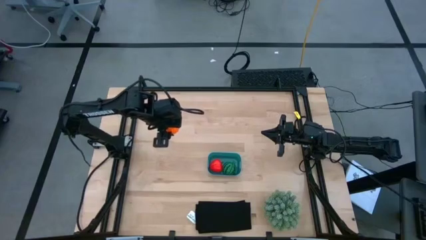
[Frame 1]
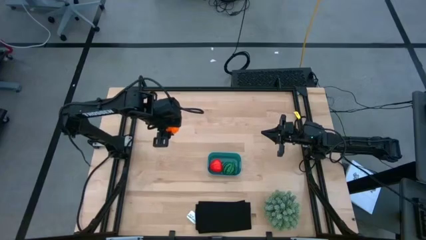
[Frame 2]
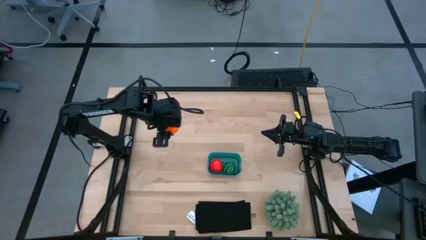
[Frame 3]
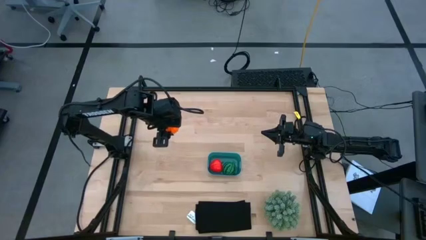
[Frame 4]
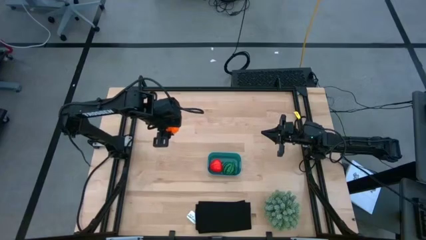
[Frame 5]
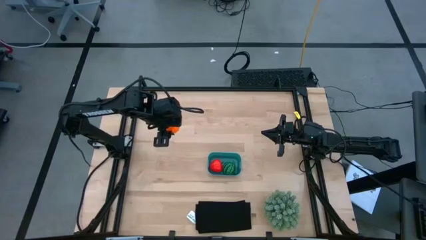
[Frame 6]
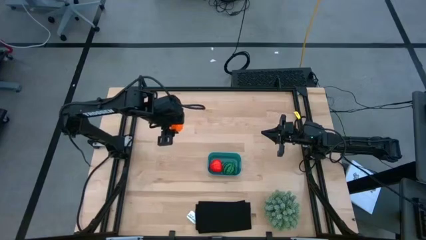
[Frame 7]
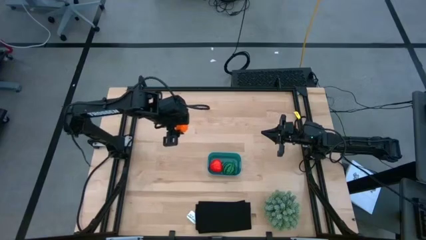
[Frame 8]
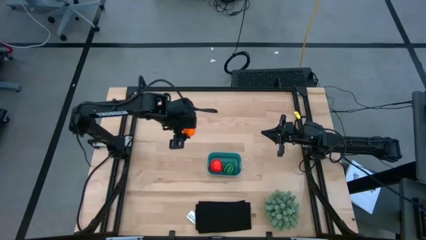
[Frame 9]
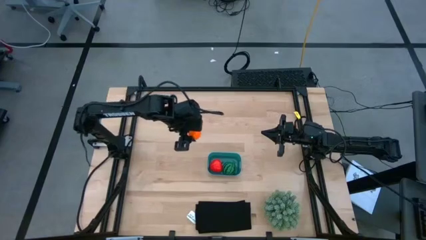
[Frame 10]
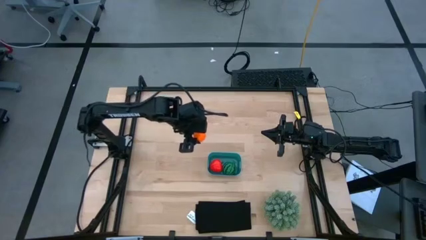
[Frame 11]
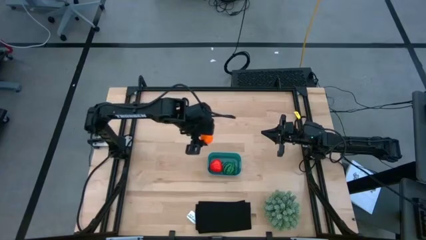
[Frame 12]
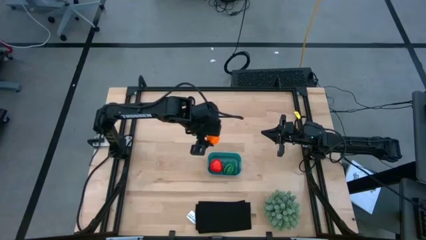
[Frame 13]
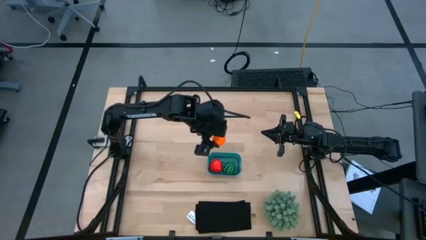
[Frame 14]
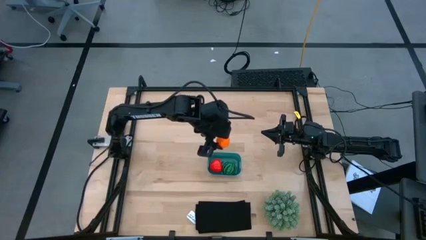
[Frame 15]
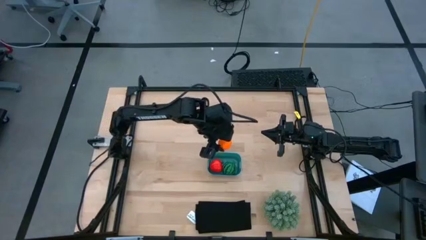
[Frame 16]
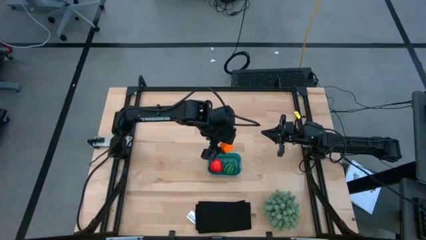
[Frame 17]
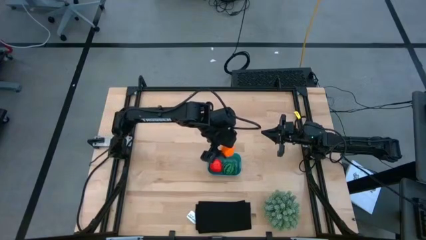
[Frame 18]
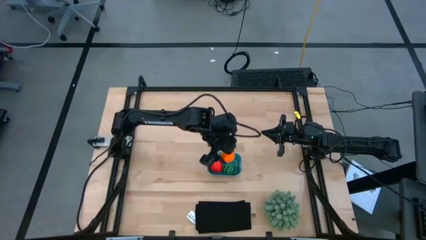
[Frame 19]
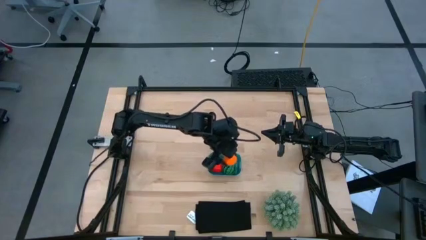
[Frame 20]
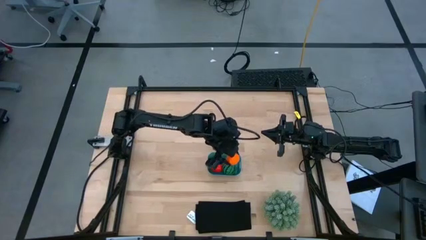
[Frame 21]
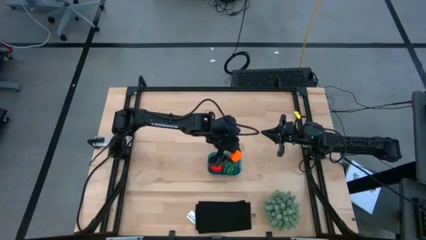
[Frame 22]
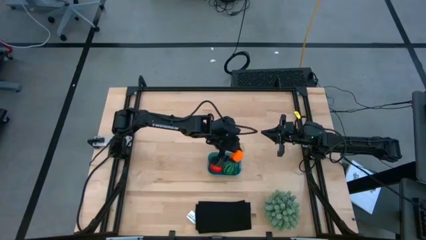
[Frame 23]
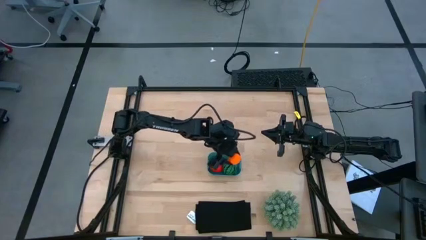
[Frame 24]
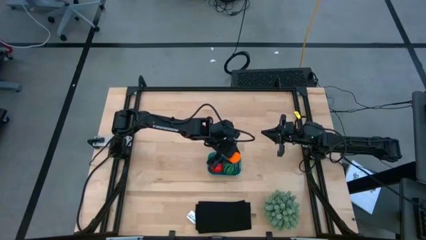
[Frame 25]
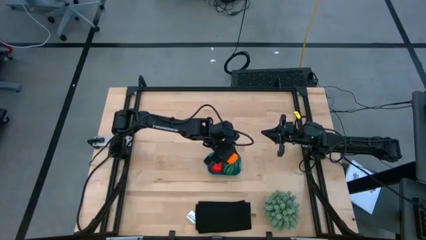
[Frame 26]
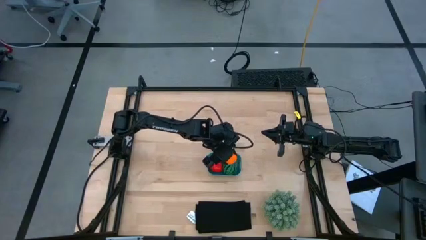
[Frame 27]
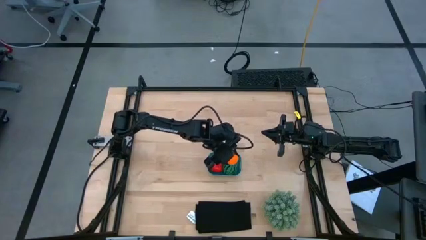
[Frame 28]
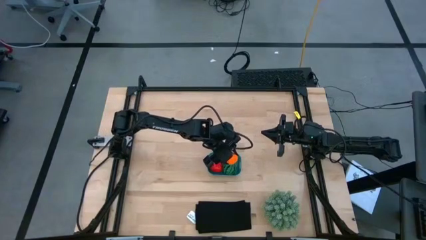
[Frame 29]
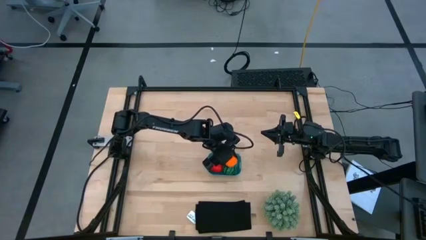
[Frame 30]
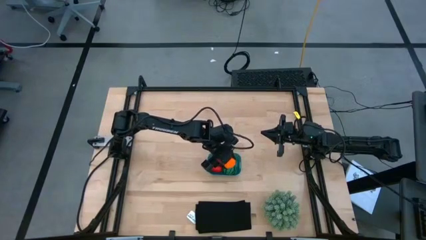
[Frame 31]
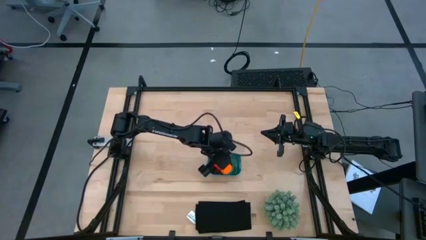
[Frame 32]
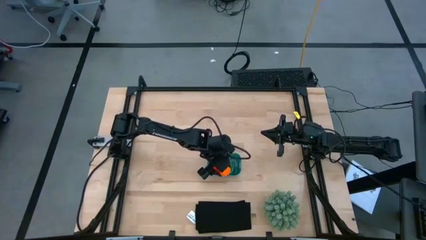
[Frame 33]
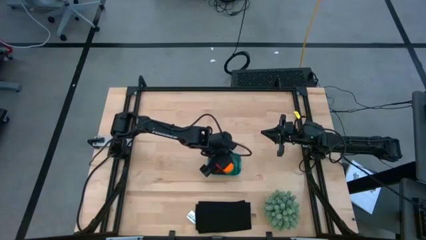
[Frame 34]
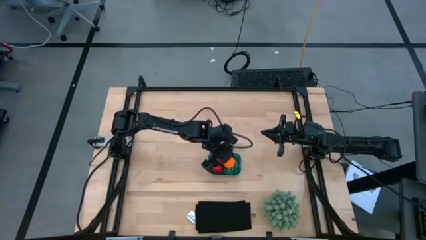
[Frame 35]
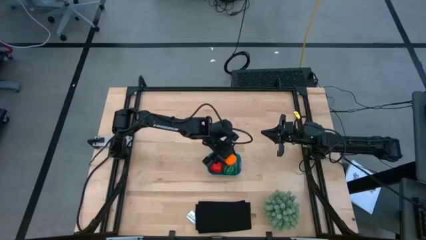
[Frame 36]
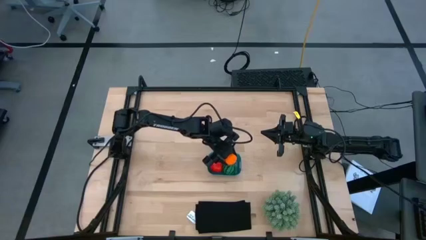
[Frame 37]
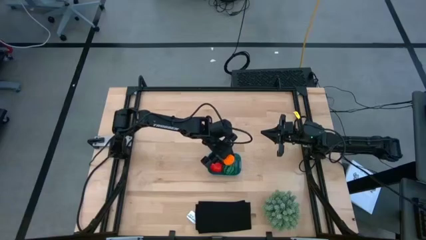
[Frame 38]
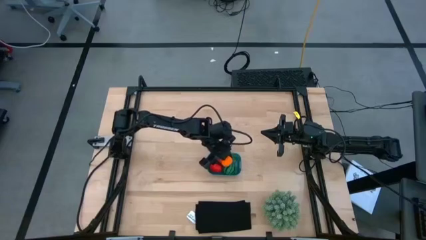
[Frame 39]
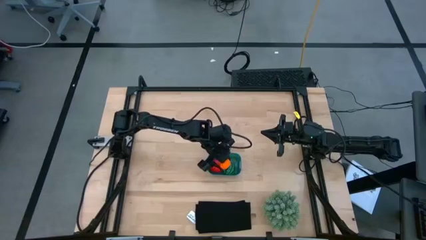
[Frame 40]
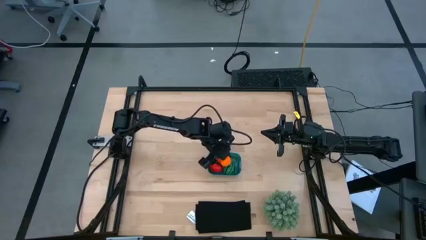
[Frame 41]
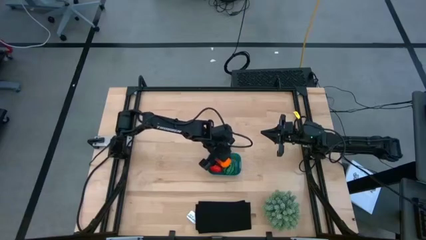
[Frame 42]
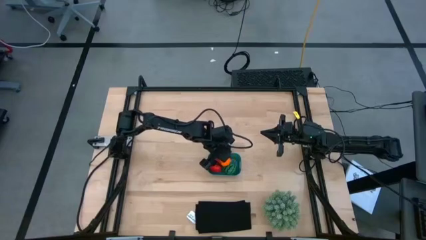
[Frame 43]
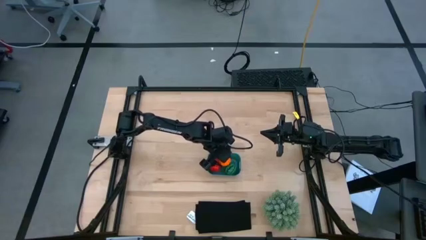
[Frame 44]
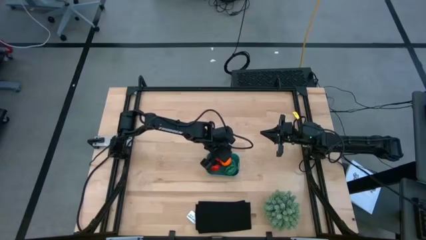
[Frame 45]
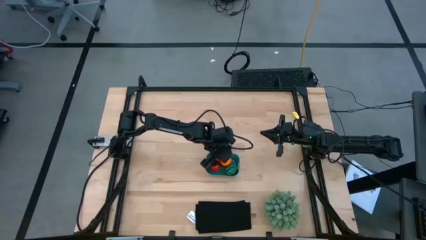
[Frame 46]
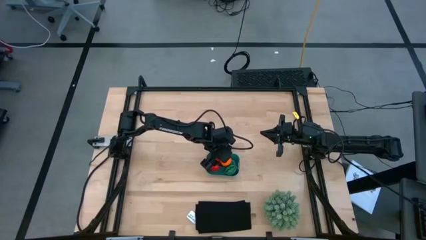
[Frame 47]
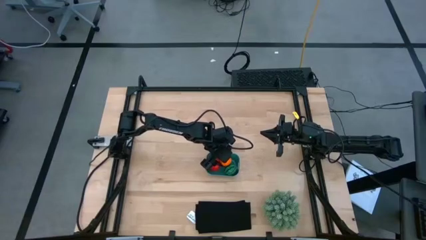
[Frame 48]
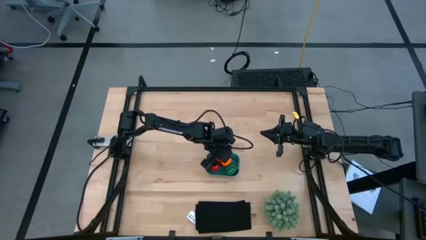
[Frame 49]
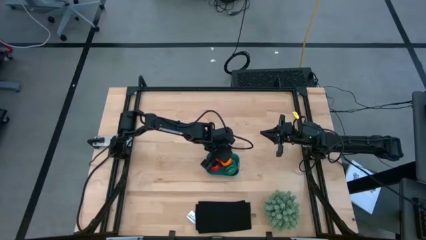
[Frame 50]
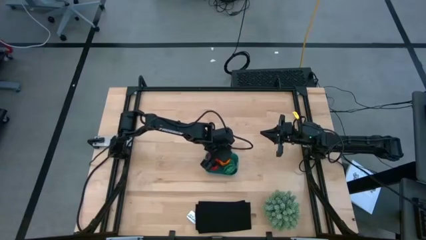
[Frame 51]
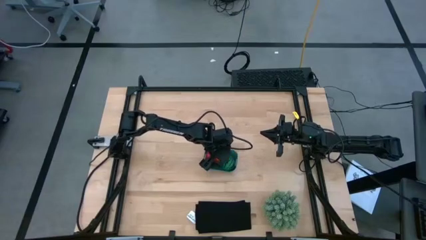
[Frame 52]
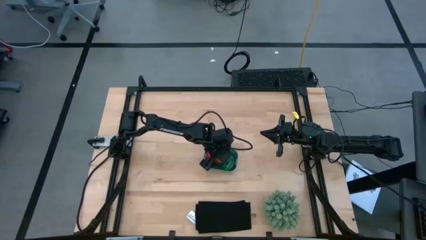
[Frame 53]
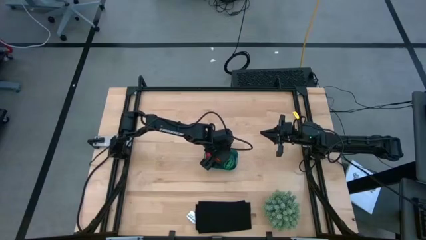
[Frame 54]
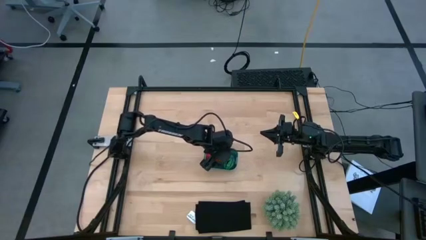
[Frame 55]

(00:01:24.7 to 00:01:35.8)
Task: Pick and placing Produce into tupperware
Put the orange pumpkin into the blue container

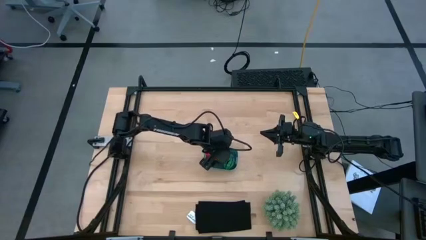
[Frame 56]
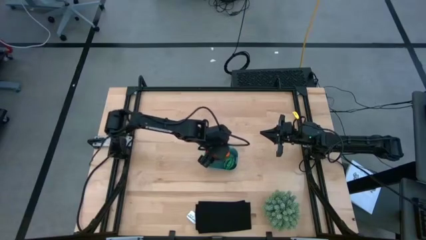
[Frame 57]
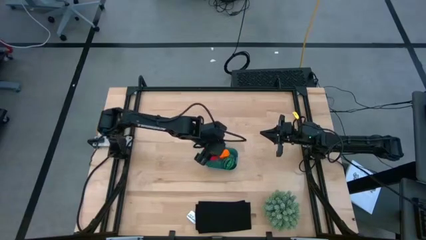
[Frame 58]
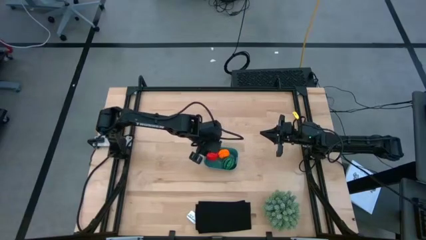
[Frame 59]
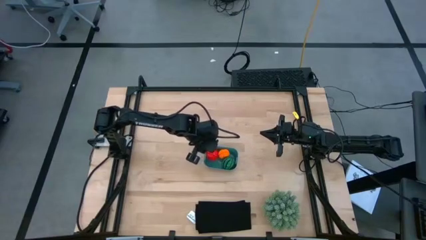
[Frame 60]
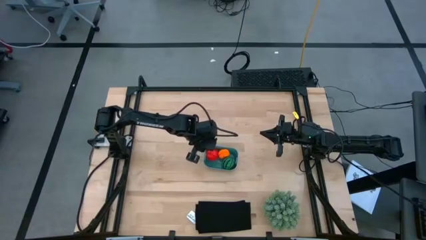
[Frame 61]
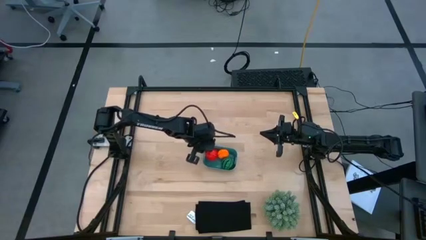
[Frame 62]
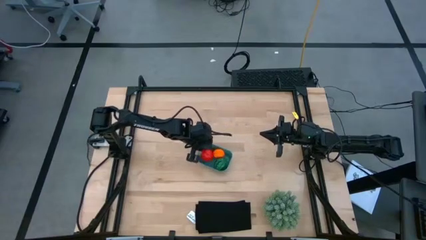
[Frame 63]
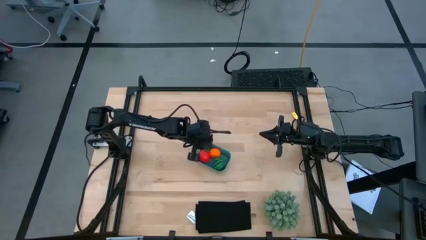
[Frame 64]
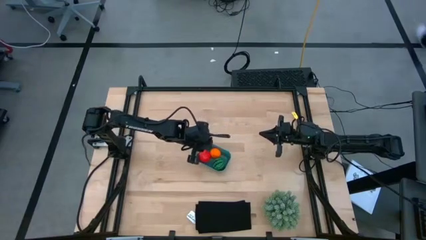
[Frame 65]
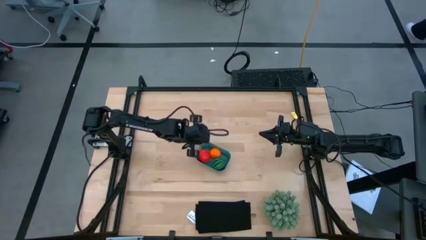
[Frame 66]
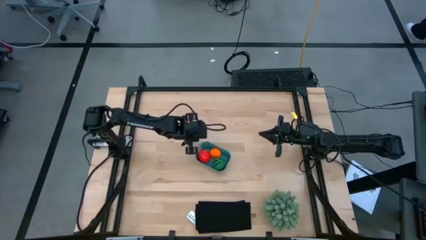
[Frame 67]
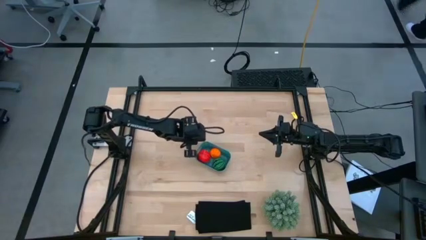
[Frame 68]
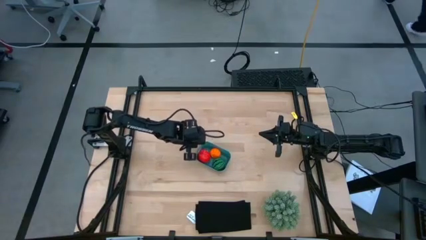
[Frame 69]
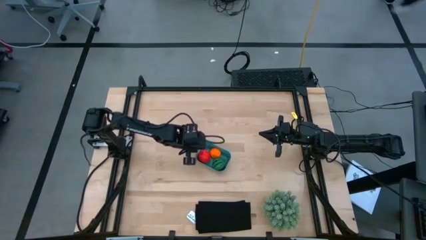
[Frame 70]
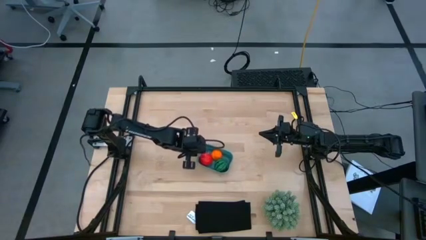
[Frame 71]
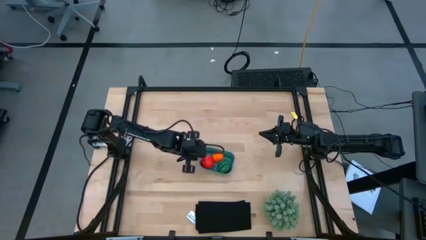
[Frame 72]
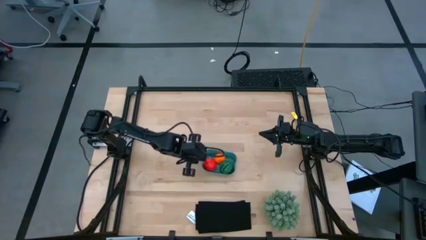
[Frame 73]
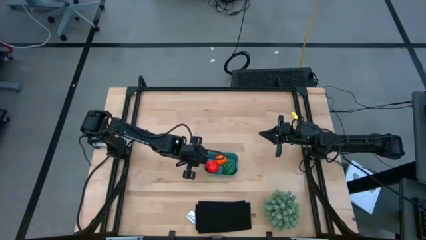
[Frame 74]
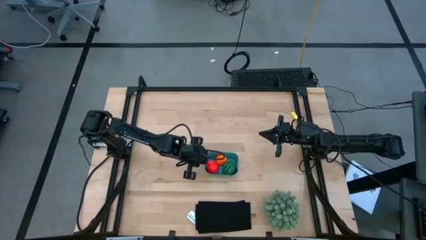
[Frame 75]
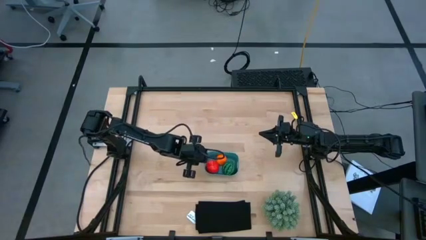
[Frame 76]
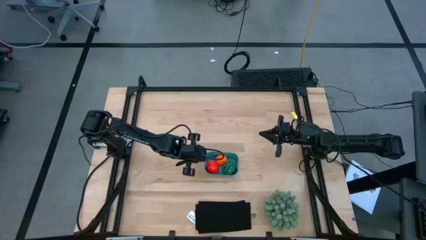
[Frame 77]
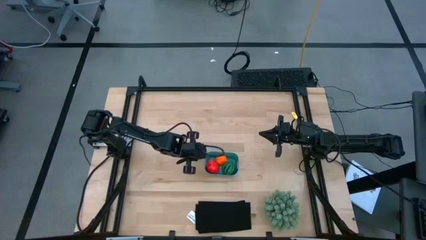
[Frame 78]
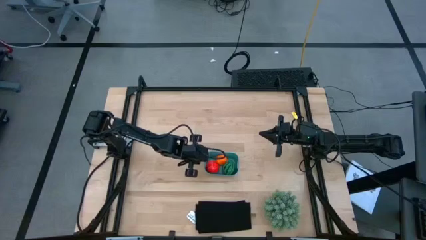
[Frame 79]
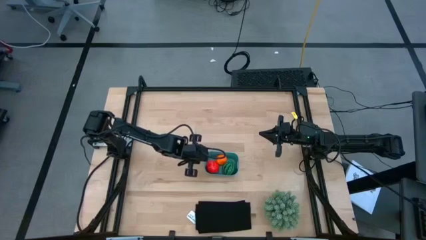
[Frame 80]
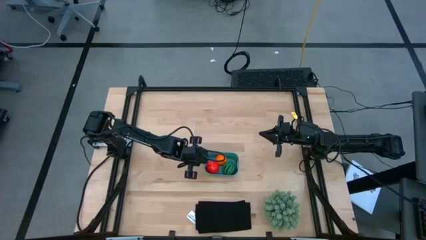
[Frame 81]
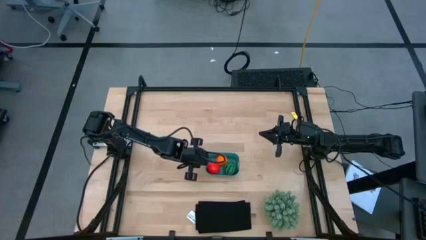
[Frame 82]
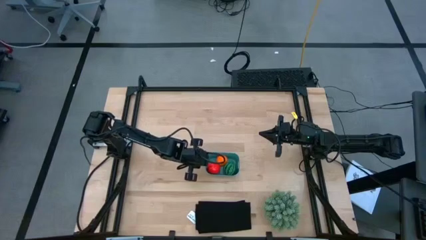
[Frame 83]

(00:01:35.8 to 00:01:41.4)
Adjust the blue container
